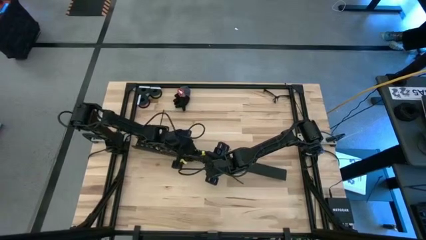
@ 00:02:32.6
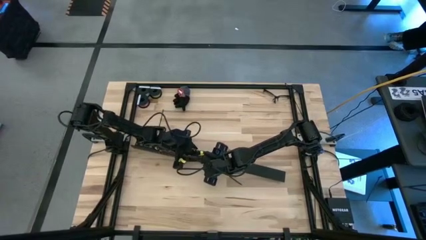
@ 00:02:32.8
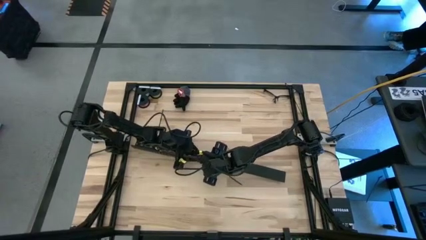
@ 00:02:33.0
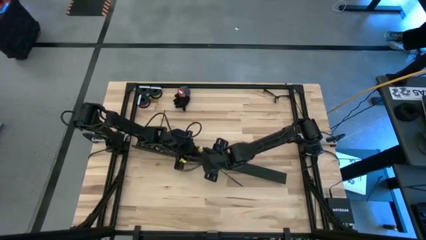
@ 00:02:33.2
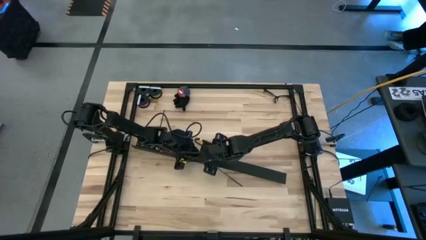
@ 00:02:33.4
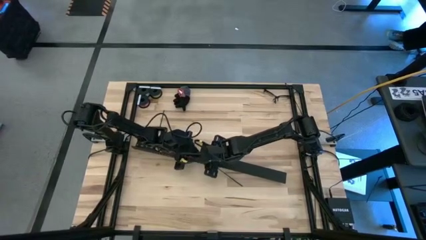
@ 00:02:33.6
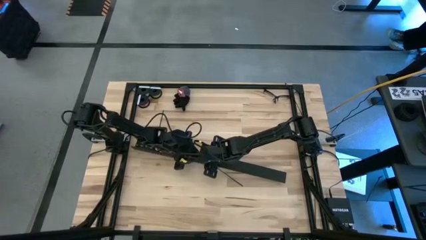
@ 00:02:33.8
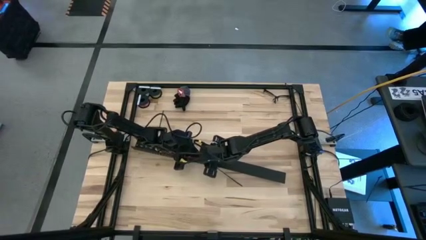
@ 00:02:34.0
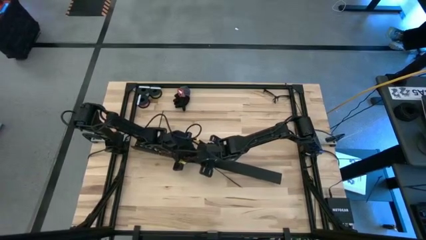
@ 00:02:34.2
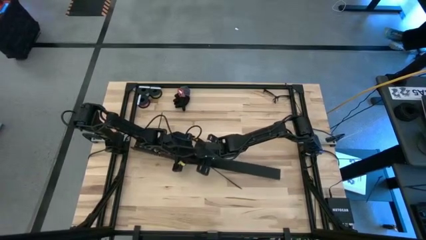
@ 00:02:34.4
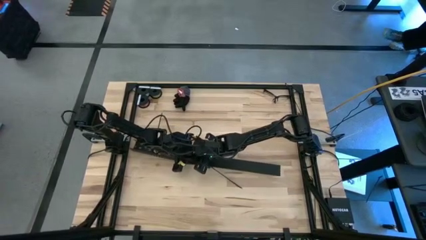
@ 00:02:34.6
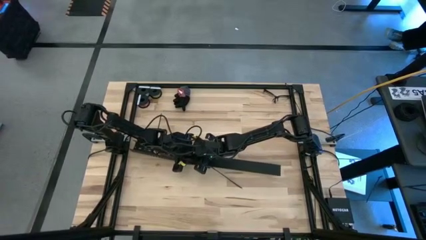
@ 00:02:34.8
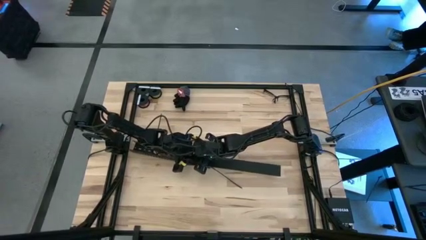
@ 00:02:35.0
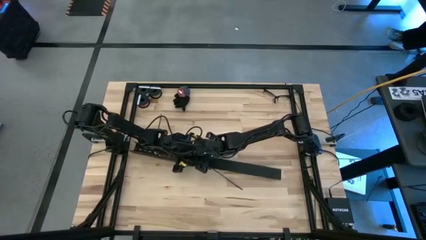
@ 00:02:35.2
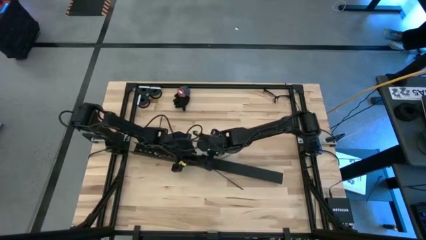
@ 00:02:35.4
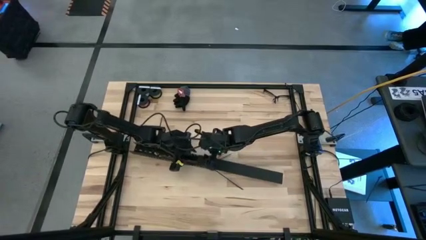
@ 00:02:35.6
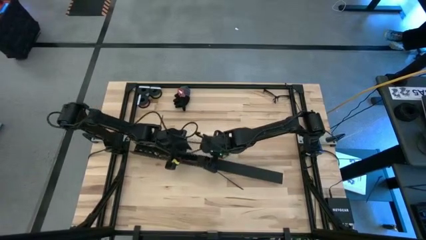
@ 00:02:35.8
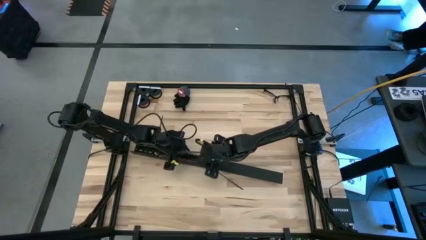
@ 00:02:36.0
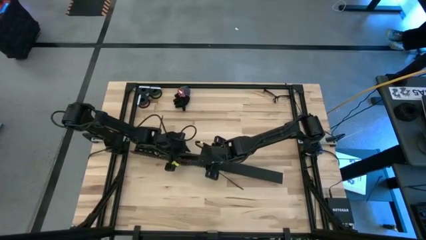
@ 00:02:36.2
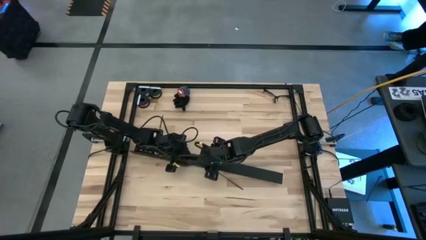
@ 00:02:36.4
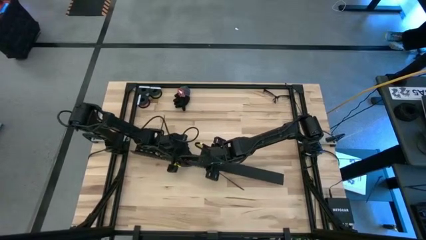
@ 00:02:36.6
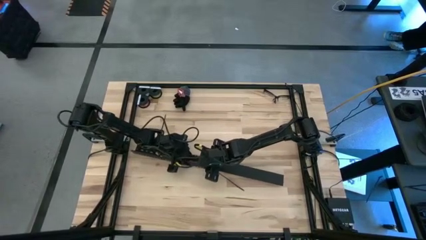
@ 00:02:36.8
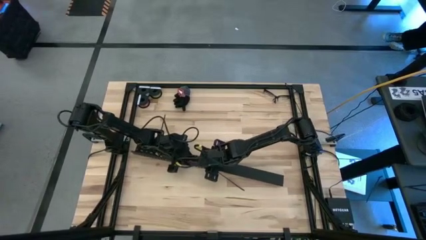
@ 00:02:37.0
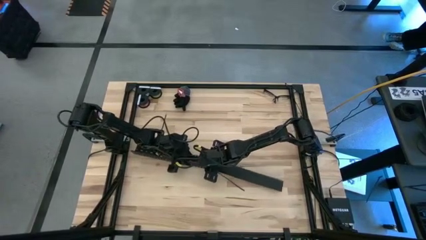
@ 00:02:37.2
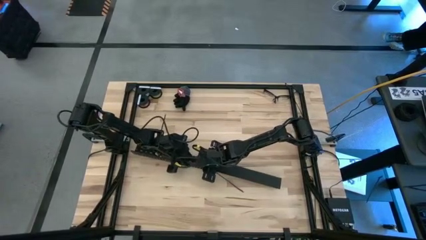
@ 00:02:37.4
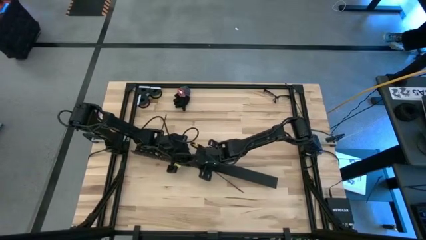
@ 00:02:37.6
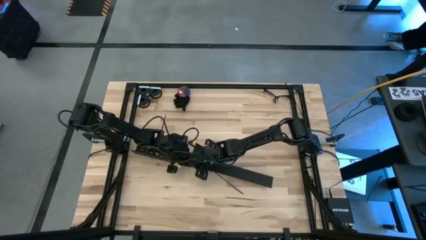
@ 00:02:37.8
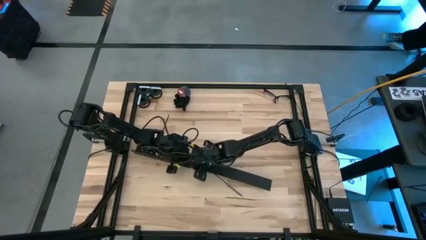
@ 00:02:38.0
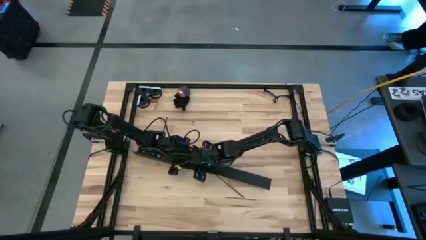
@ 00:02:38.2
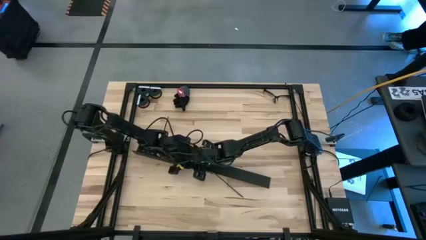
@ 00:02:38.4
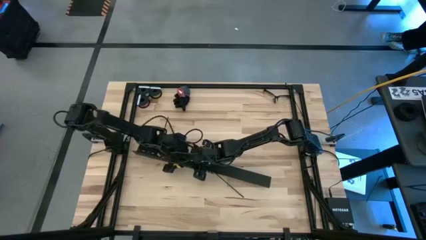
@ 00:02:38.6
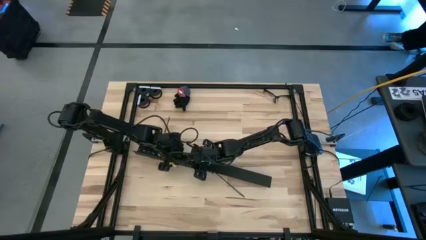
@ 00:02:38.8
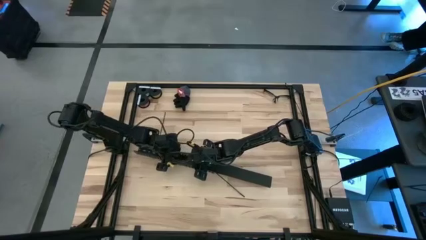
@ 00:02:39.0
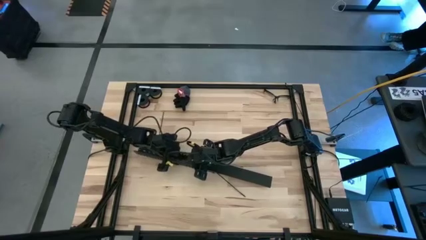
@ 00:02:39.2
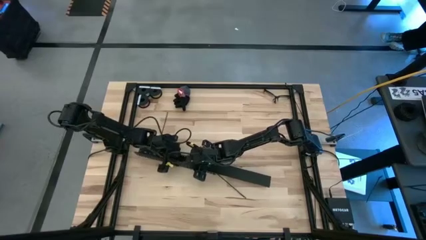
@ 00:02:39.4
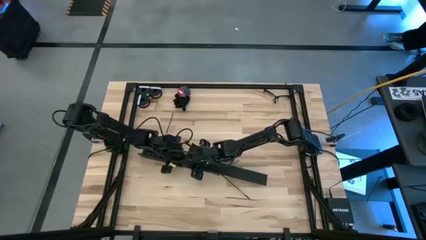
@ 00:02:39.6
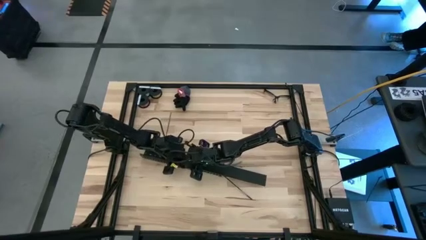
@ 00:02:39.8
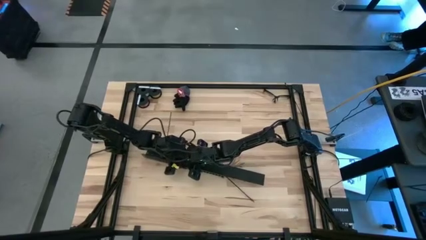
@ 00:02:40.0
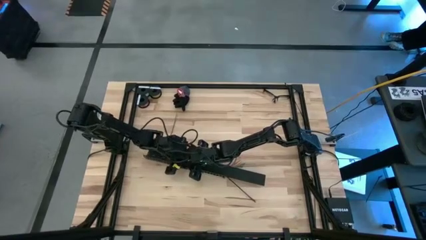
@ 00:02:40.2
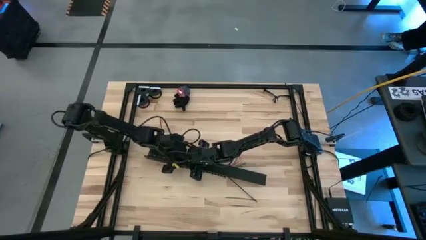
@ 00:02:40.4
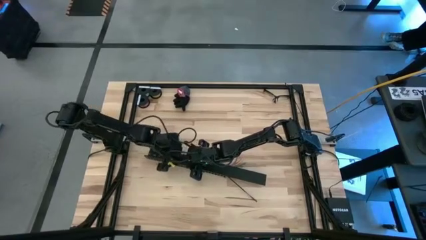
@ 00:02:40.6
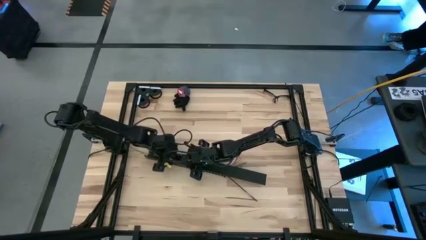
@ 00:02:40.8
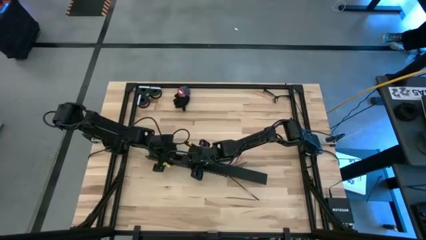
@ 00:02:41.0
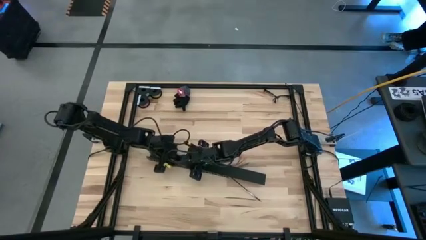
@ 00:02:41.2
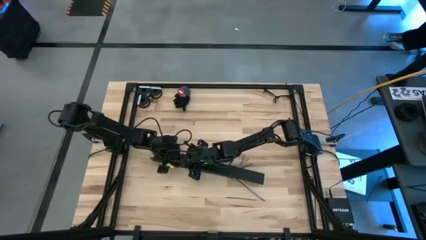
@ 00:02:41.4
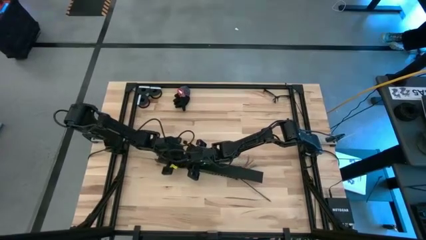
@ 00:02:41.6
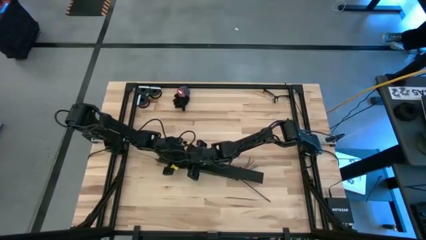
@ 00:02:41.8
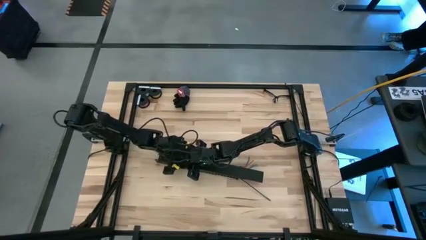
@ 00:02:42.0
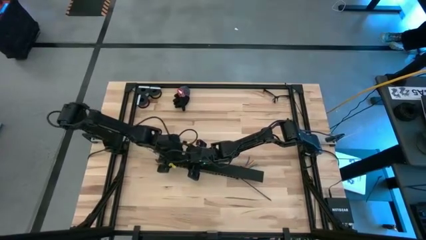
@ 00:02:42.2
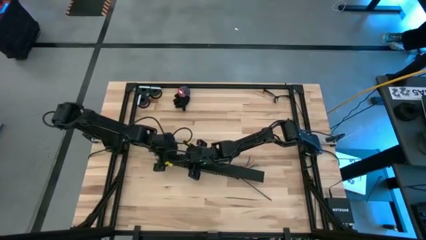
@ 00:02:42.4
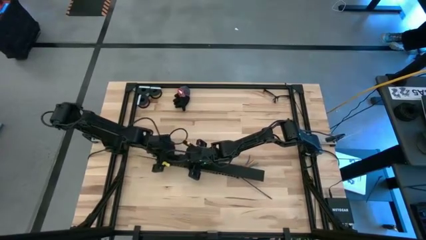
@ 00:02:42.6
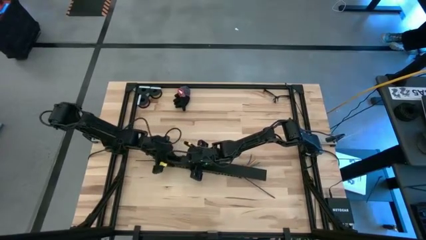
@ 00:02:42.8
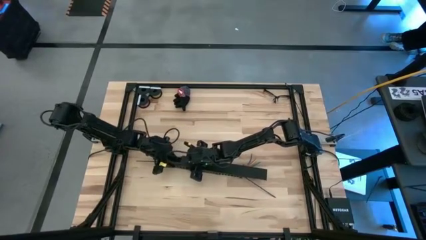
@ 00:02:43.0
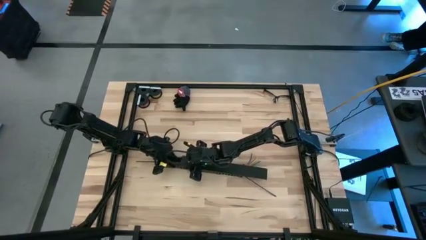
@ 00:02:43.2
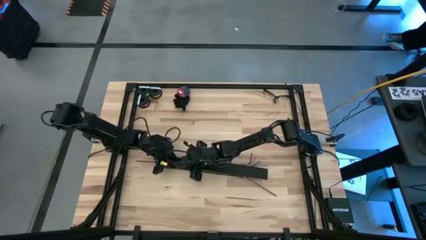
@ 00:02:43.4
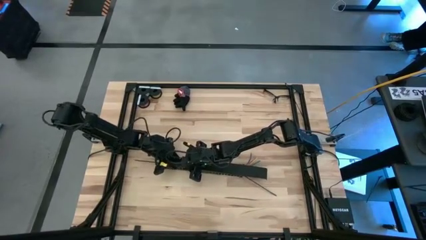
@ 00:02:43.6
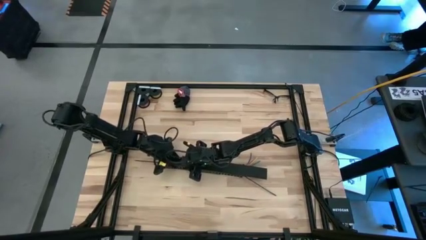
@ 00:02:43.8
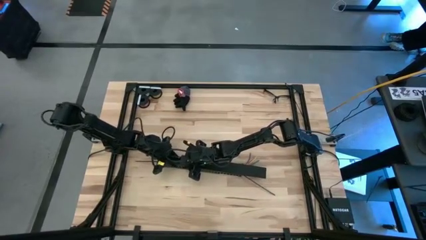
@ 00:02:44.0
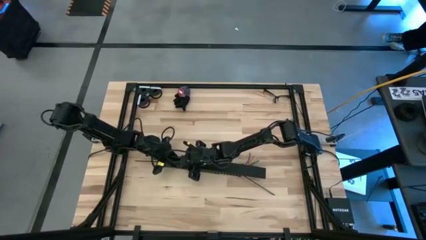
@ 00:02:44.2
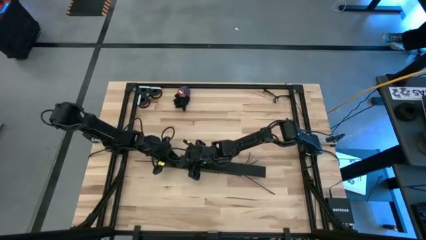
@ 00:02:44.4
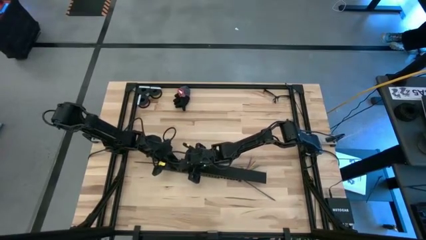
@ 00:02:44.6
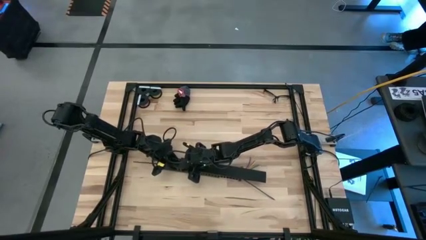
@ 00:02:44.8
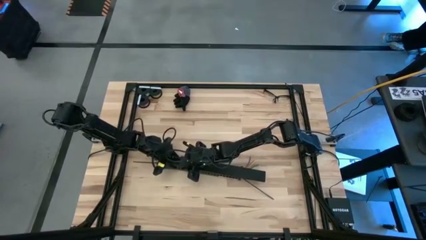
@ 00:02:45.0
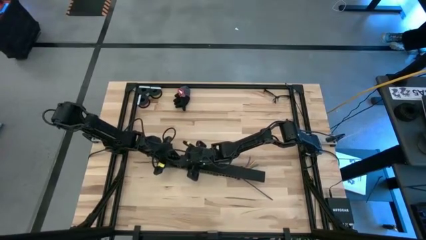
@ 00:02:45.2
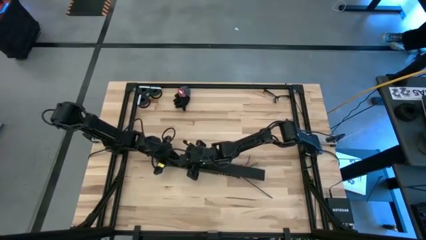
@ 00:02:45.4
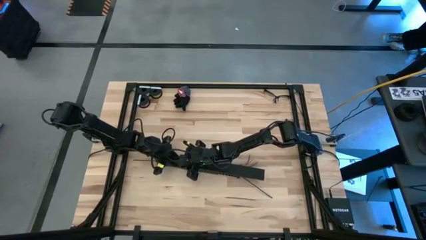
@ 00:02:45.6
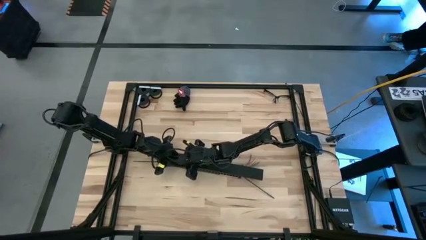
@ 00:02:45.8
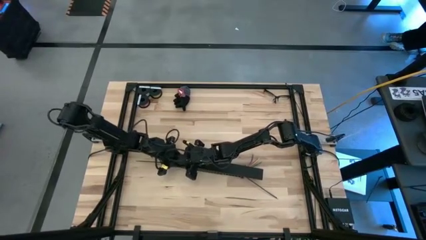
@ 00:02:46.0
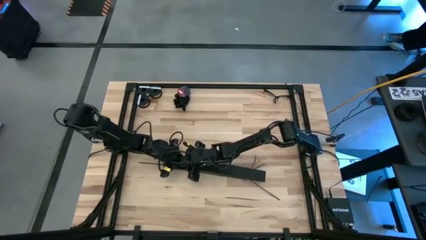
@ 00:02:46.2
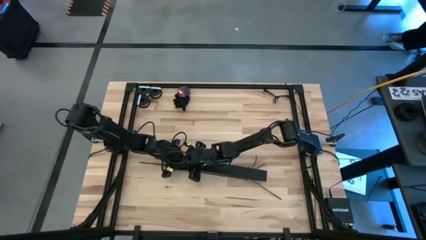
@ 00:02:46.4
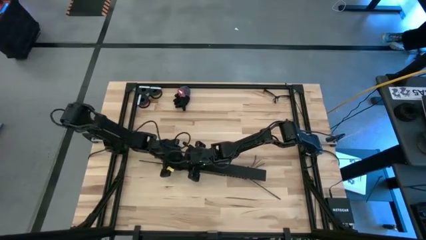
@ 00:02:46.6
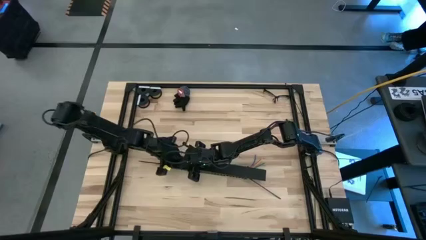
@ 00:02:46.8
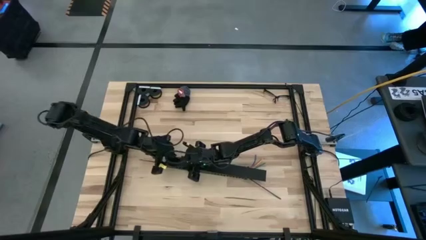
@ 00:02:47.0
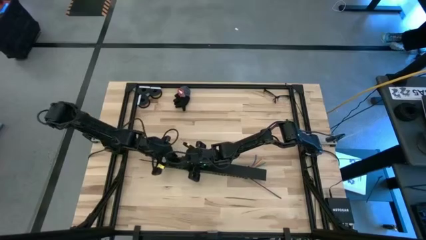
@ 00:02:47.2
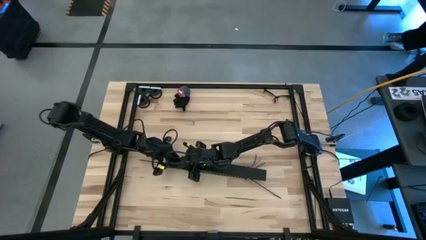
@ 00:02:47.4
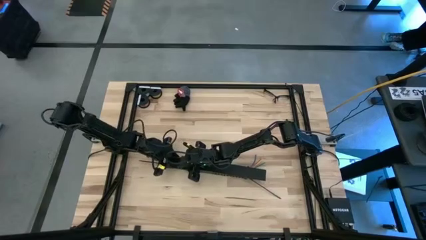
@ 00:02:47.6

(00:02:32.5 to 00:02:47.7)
Task: Ziptie cables
Close the black cable duct with the cable duct cover
